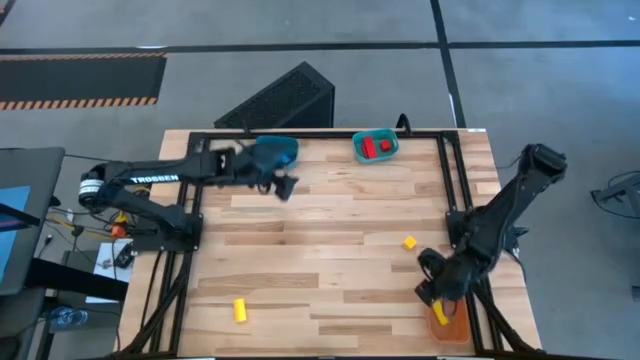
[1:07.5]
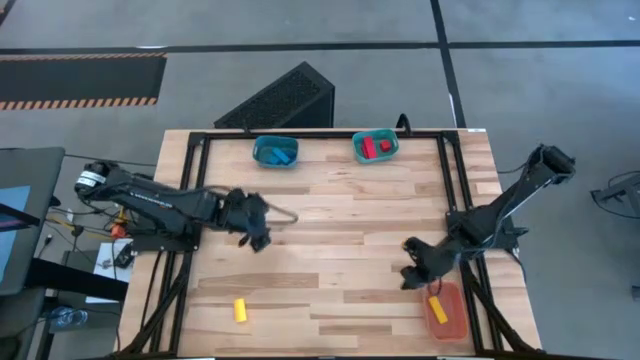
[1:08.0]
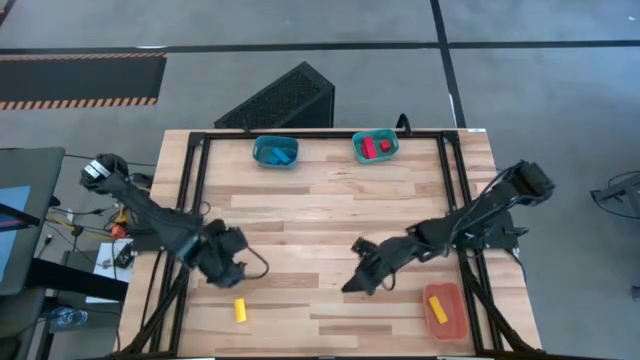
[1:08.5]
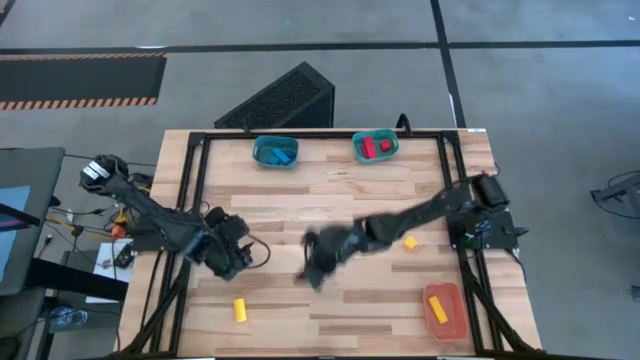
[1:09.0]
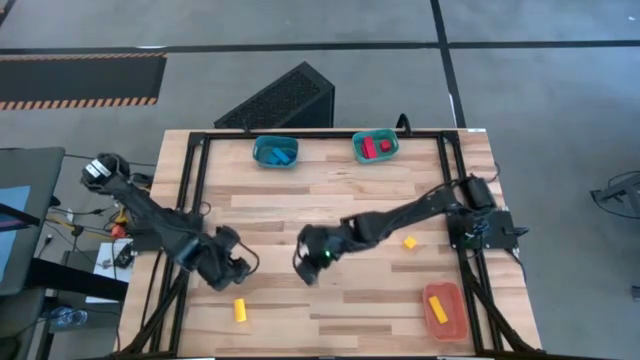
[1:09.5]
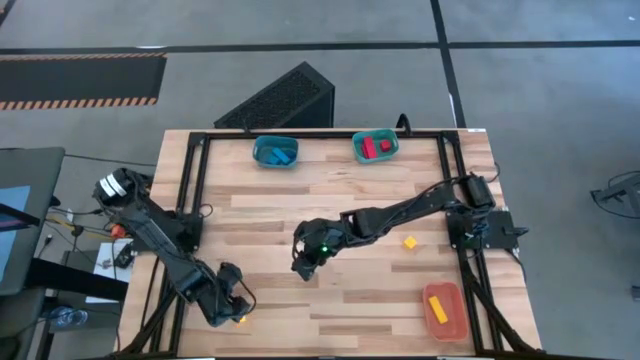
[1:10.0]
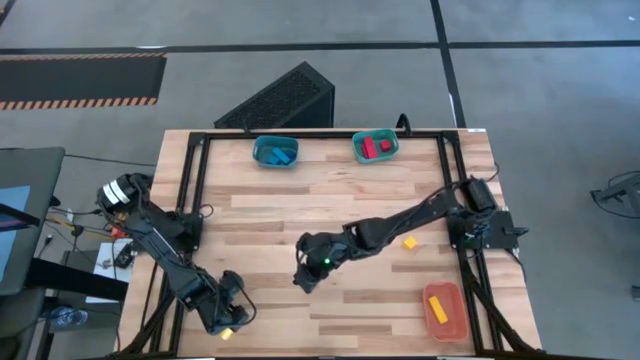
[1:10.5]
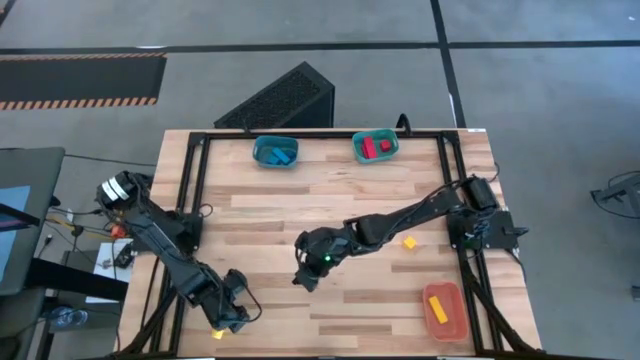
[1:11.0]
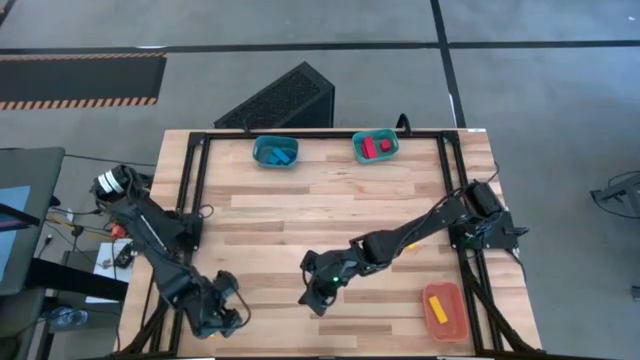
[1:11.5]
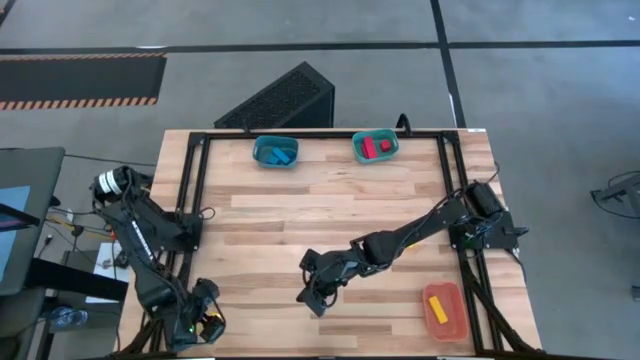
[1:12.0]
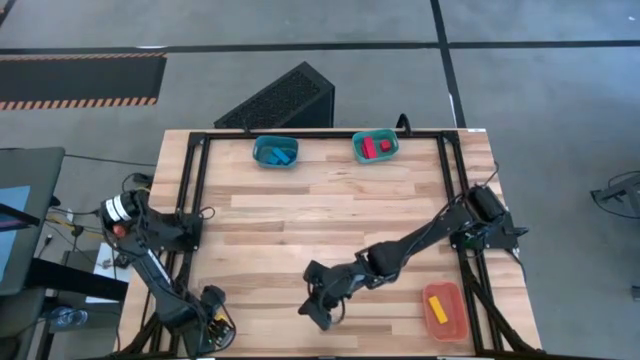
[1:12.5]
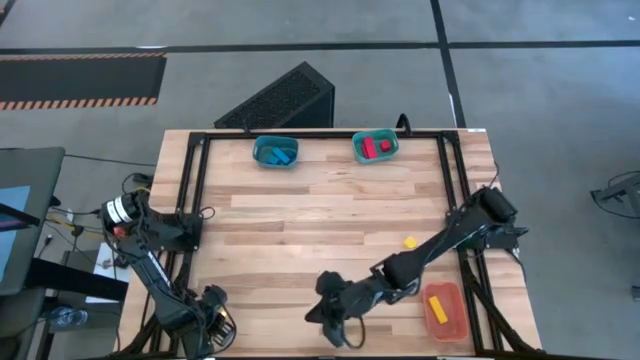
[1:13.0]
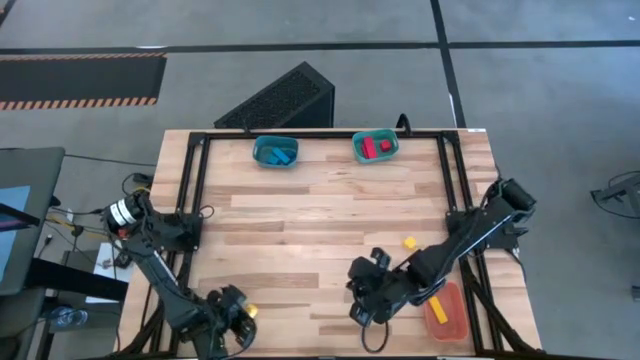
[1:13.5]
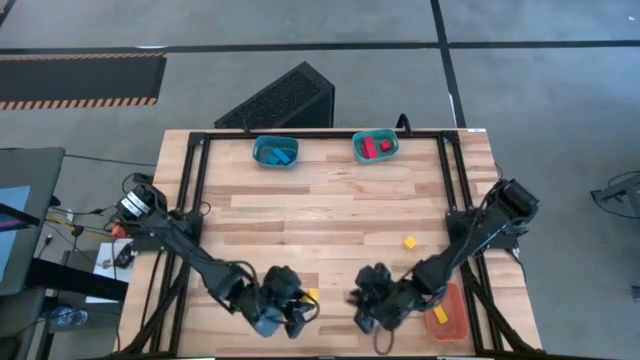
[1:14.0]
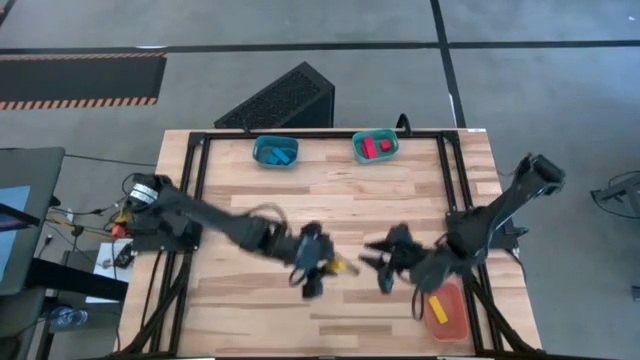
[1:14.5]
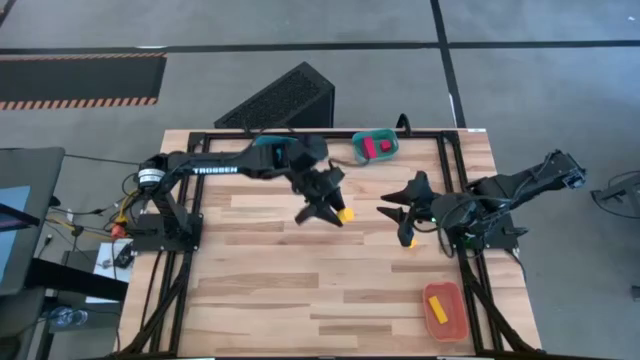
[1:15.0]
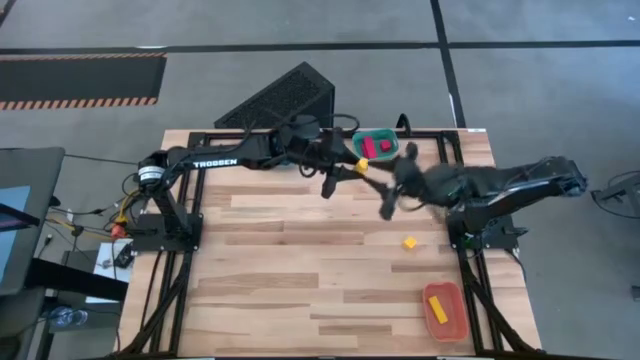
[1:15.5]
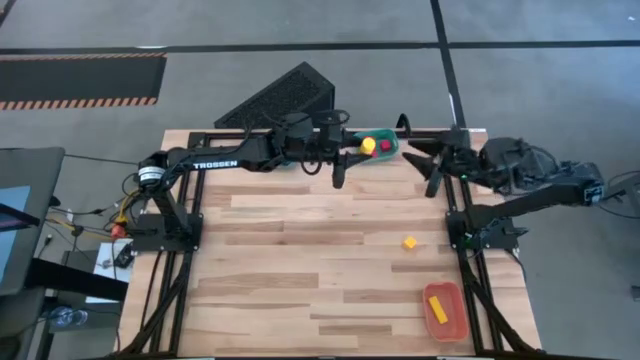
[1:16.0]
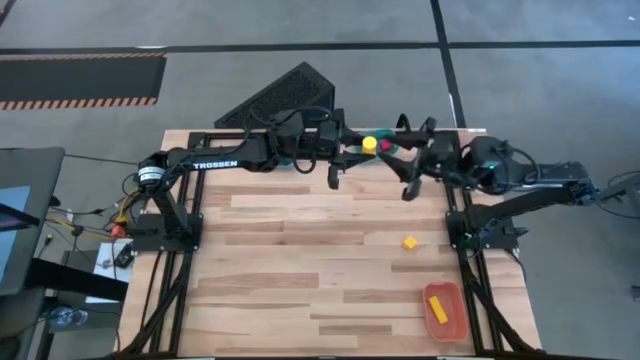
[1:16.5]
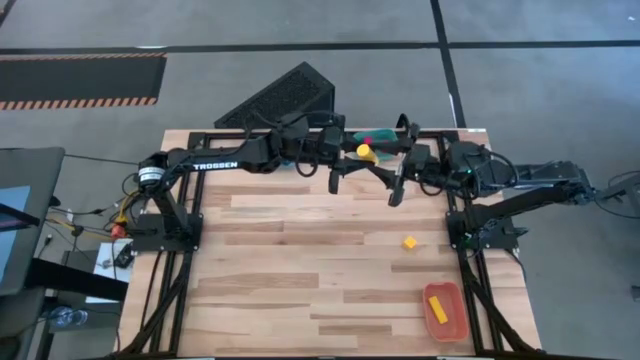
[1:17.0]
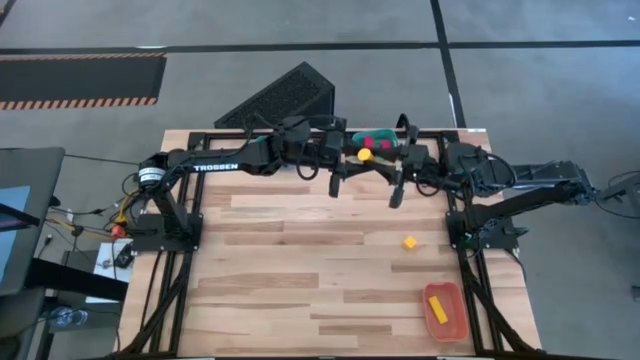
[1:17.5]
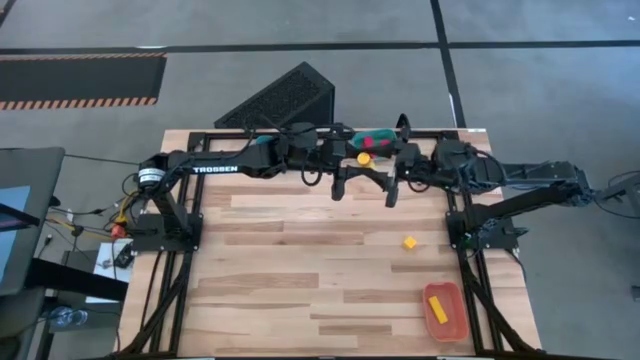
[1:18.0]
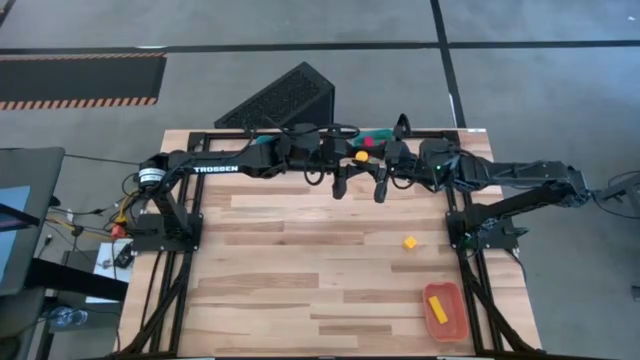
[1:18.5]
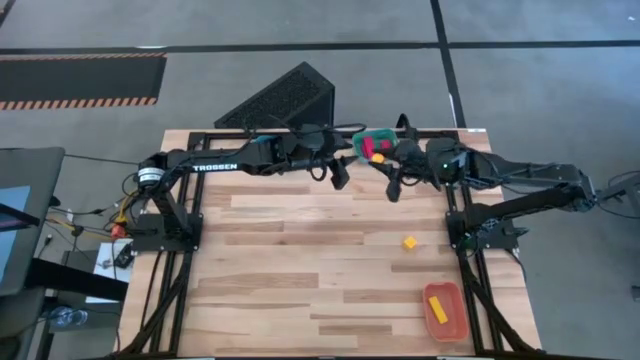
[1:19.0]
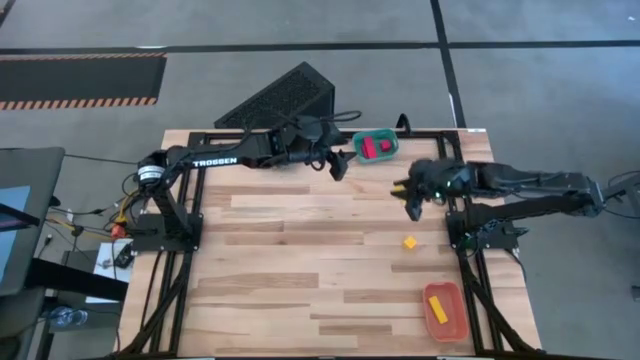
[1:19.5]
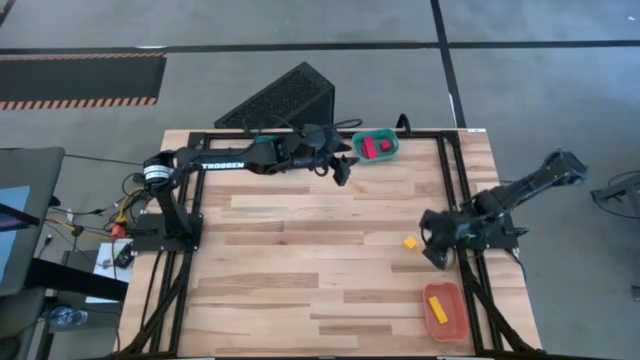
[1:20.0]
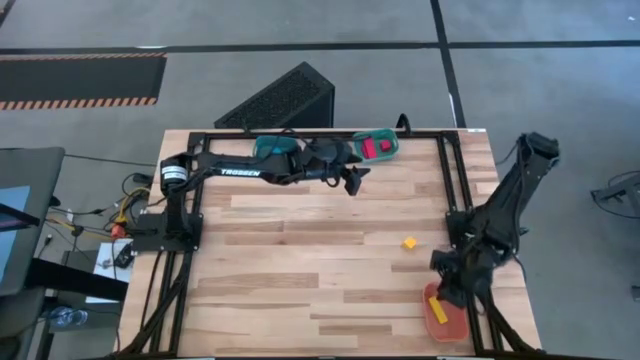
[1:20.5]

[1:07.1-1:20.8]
Task: Sort & place blocks by color
Put the left yellow block into the orange bin

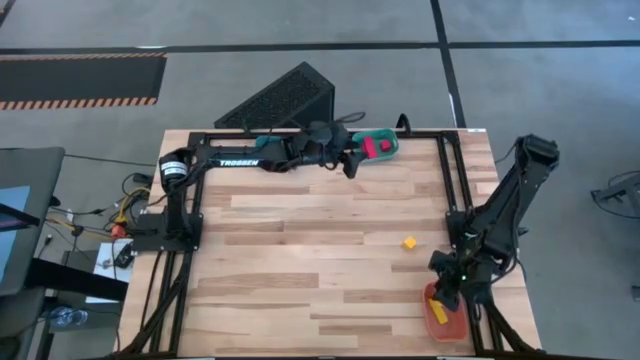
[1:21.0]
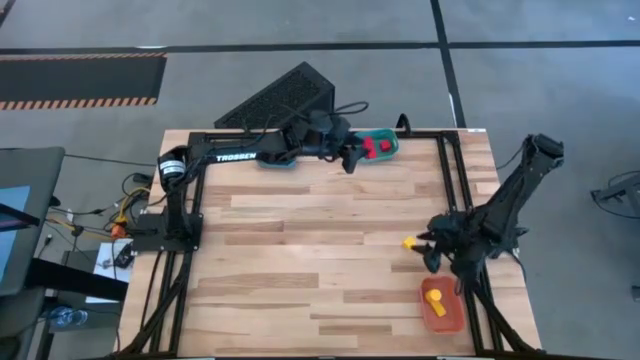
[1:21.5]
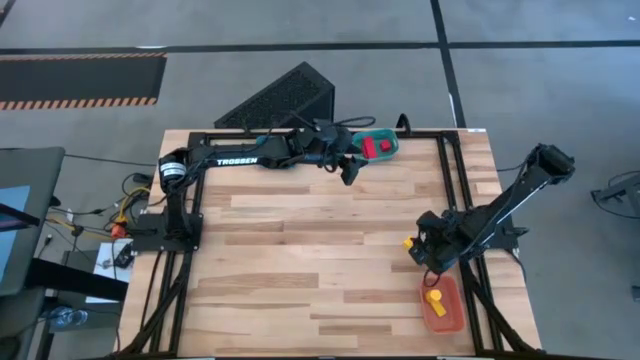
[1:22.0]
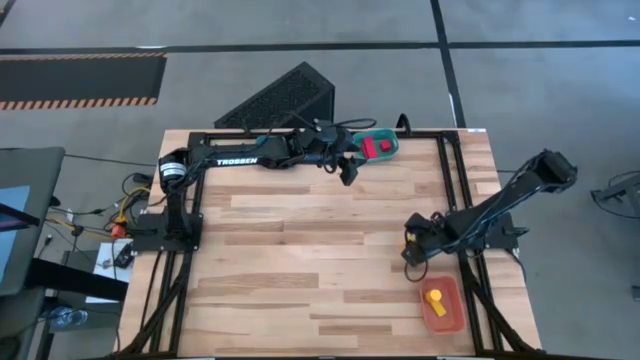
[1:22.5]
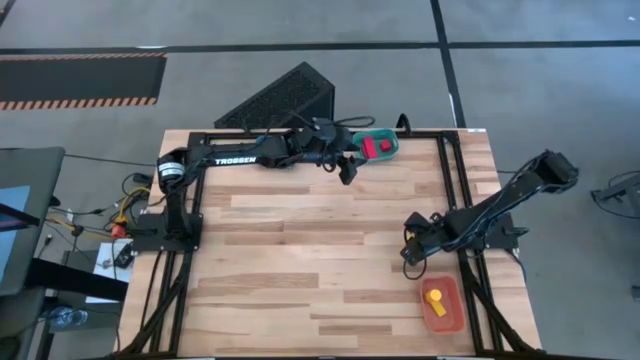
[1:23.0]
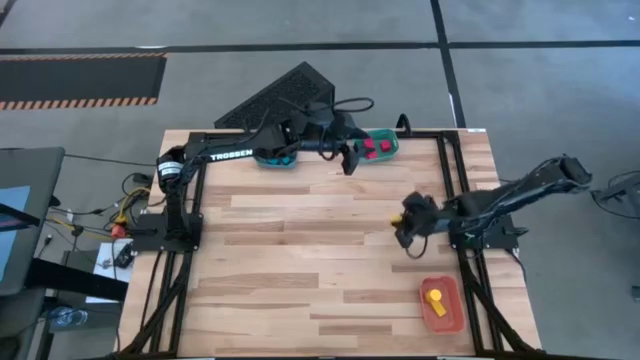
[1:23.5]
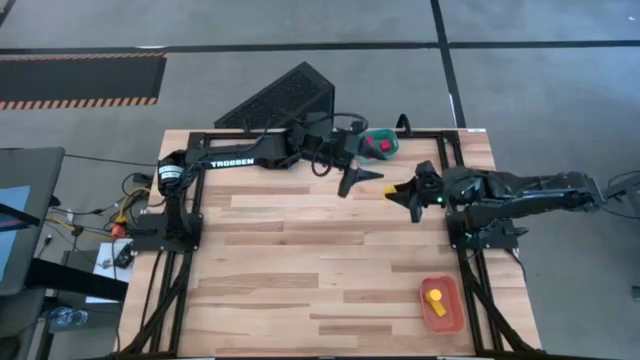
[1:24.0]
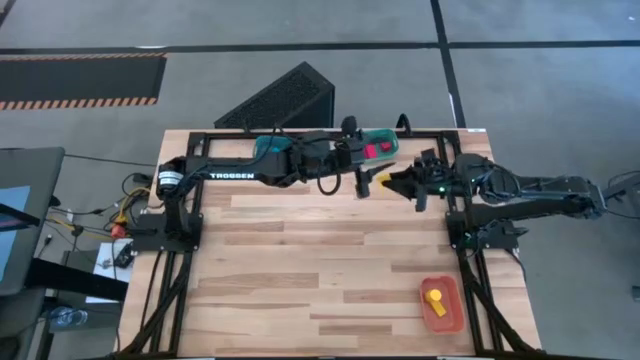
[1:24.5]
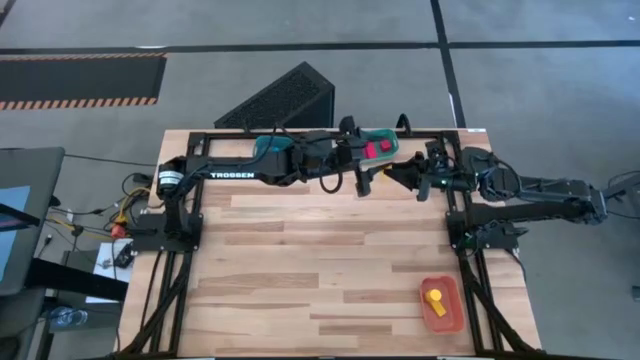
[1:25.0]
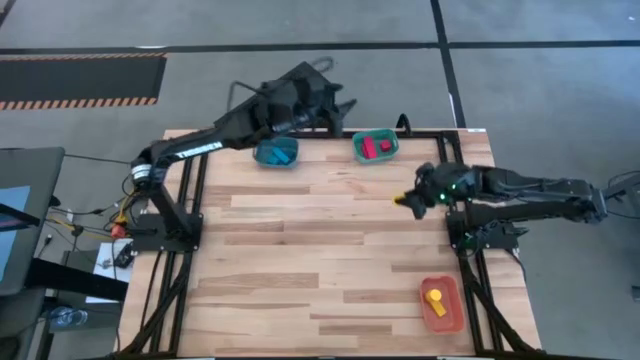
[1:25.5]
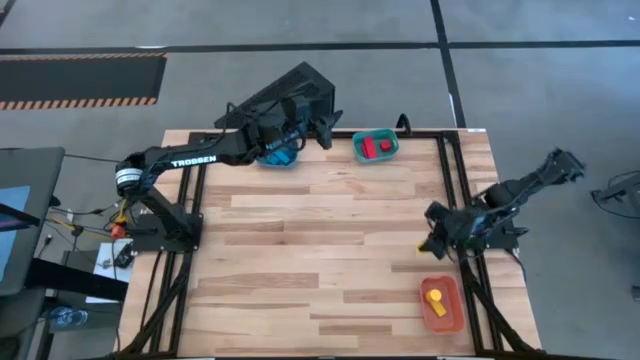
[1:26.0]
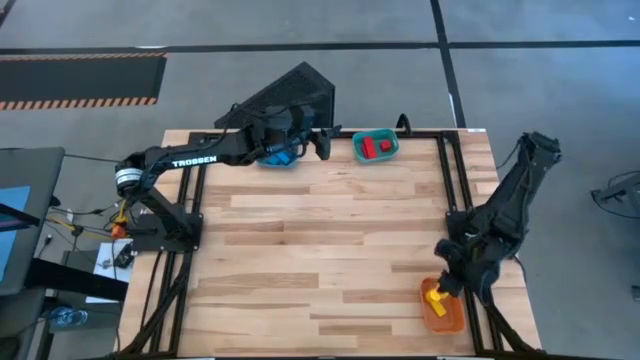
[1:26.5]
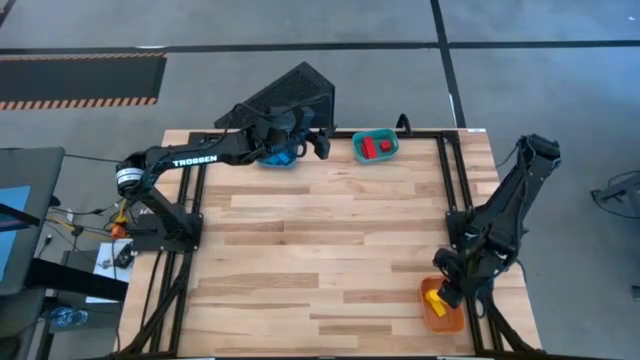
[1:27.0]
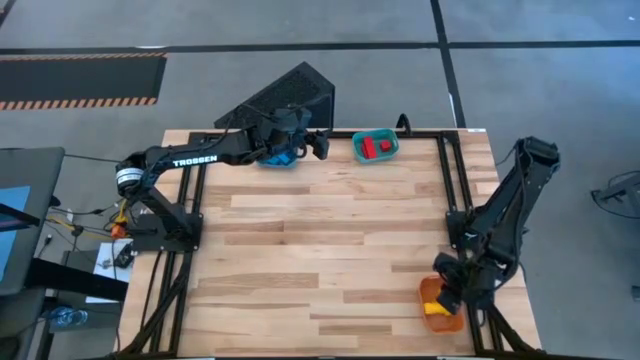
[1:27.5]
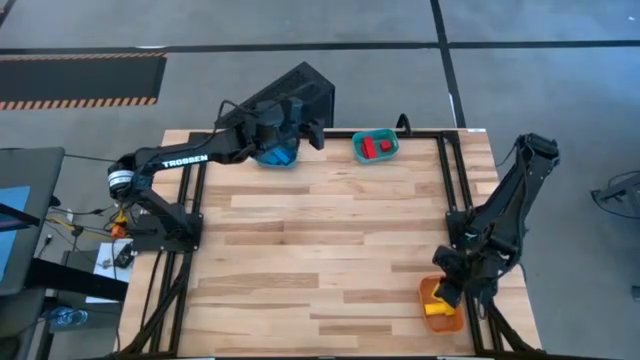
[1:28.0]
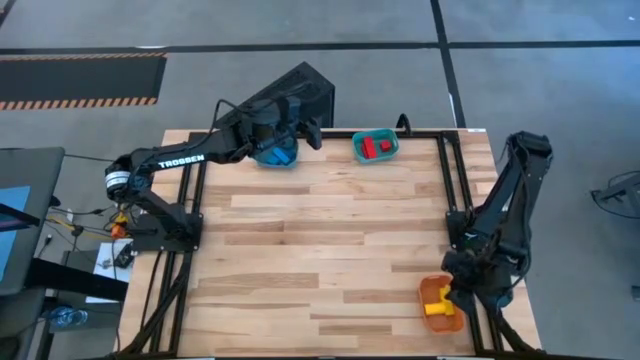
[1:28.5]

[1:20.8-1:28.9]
Put the yellow block into the orange bin
